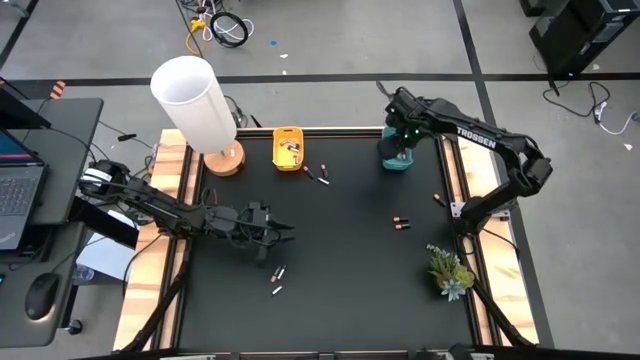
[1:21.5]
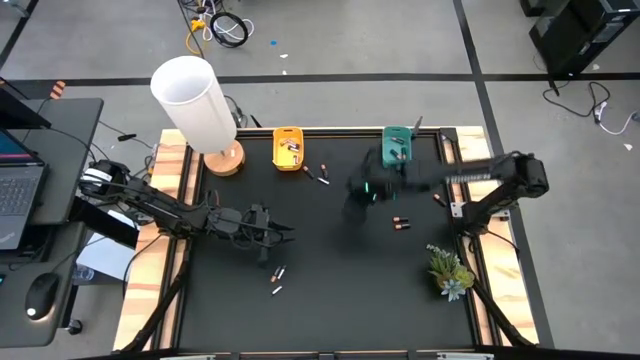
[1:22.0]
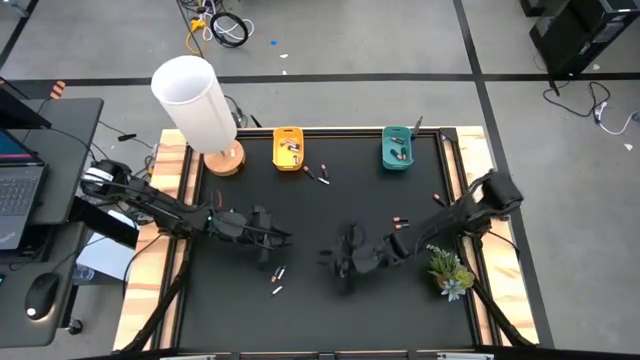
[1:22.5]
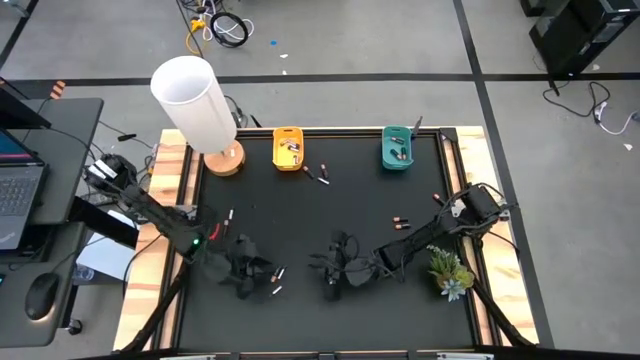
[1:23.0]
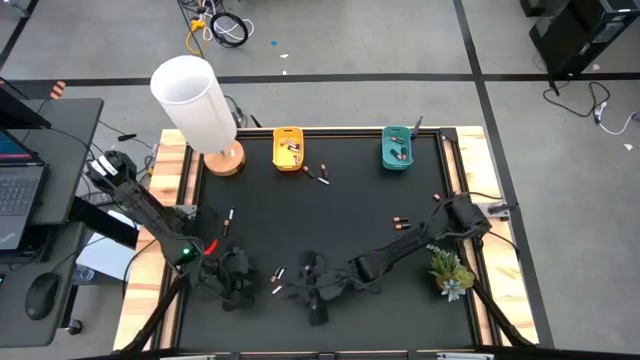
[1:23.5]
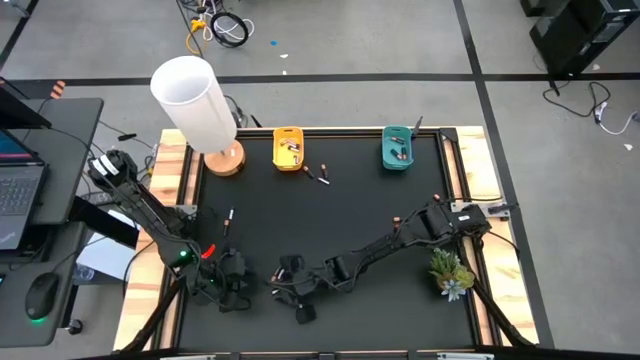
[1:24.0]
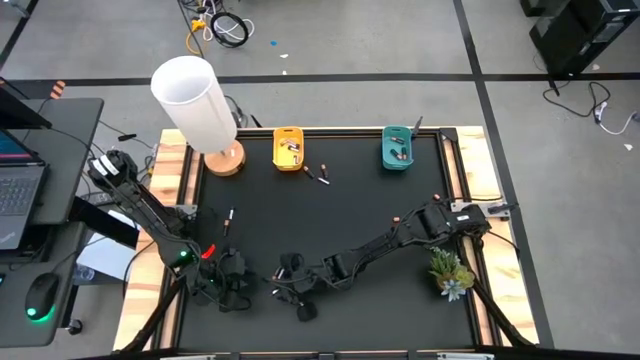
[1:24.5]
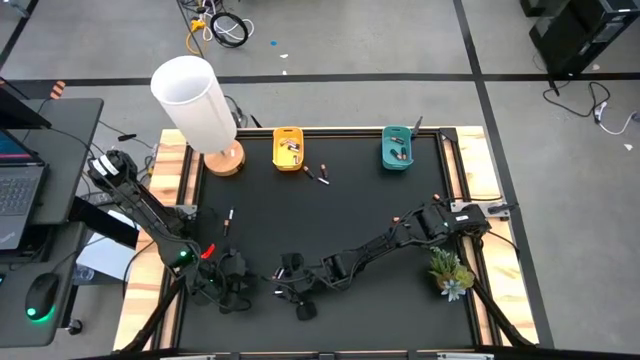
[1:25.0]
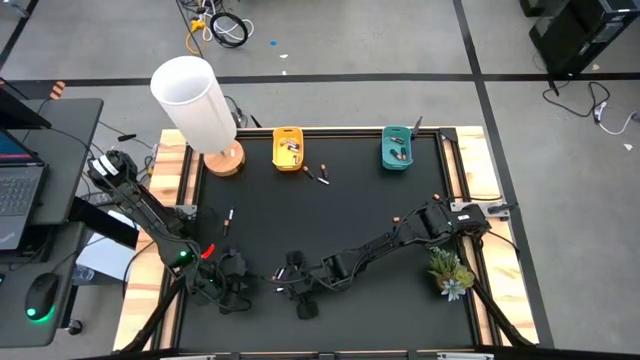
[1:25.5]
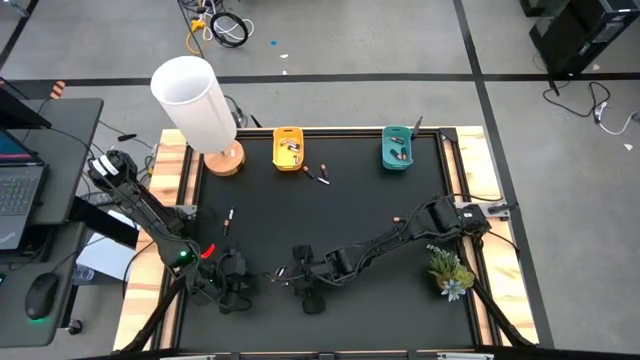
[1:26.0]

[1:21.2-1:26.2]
Task: Sort batteries
Put the silver battery into the yellow bin

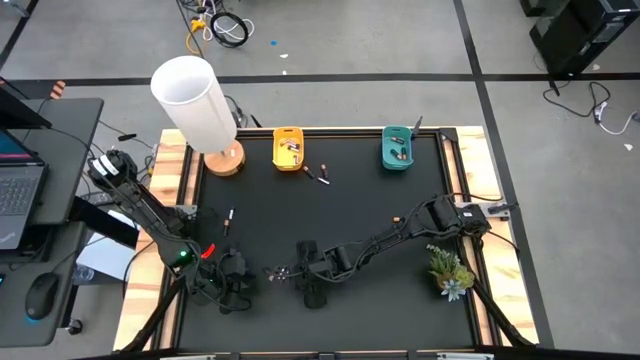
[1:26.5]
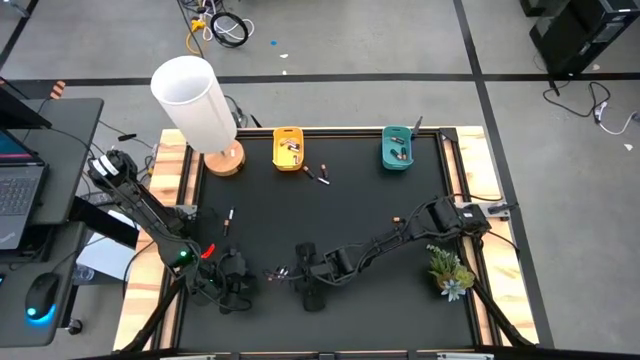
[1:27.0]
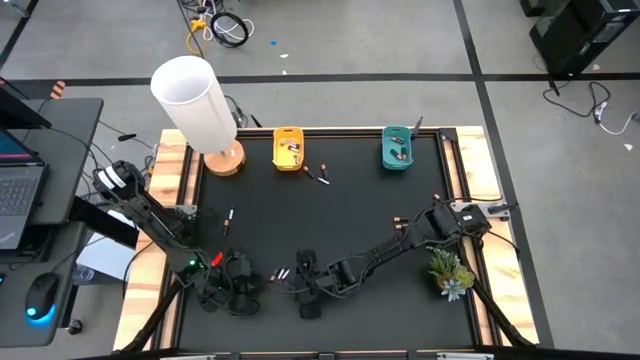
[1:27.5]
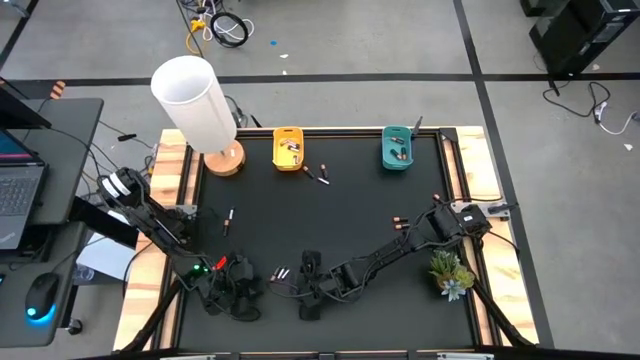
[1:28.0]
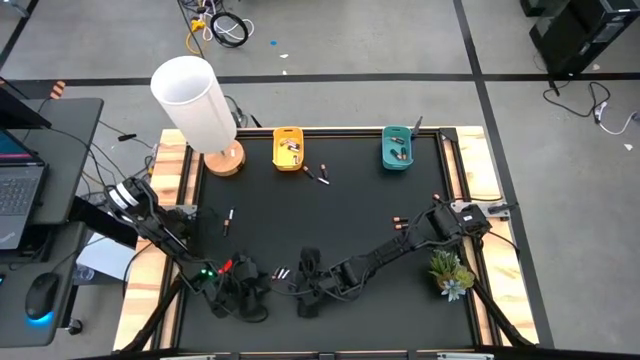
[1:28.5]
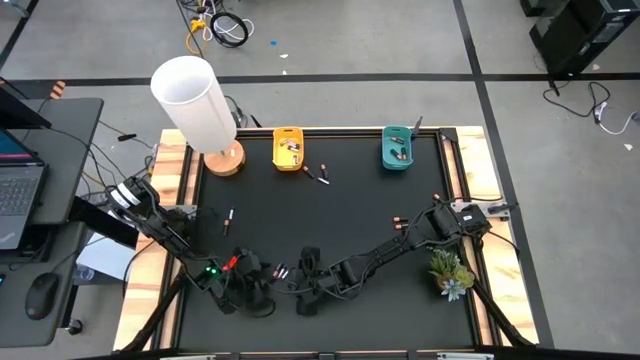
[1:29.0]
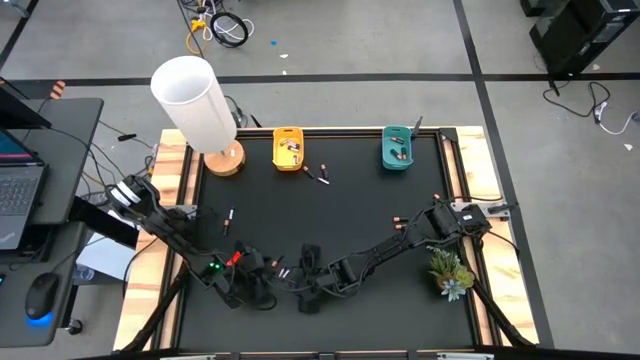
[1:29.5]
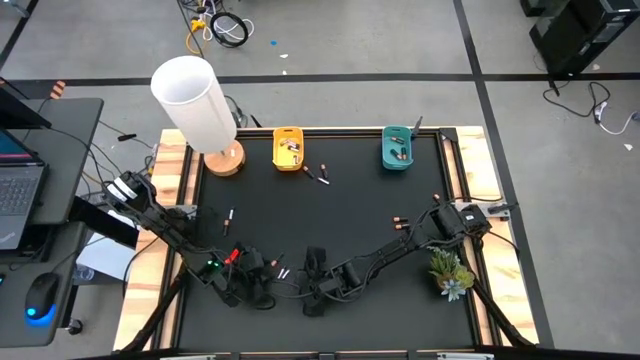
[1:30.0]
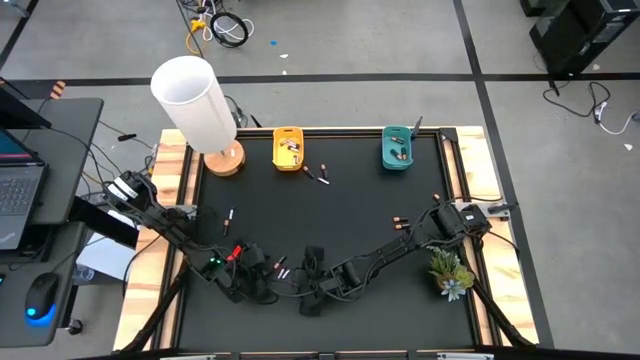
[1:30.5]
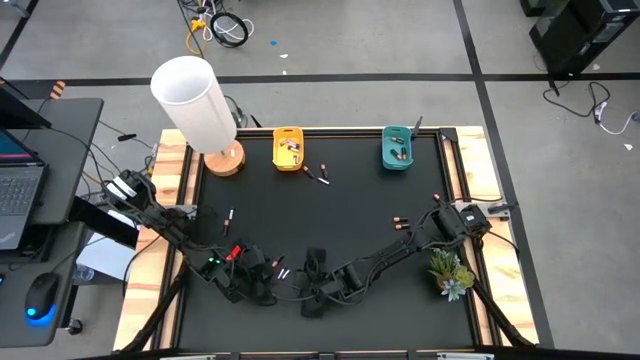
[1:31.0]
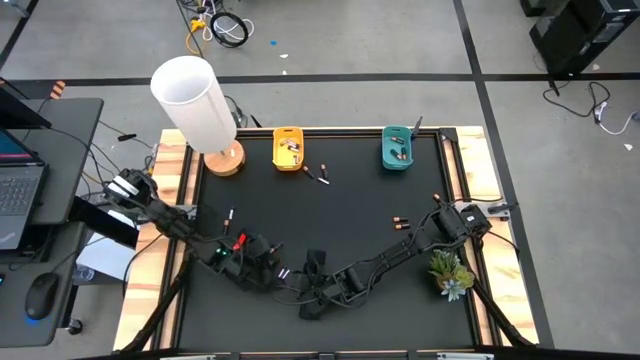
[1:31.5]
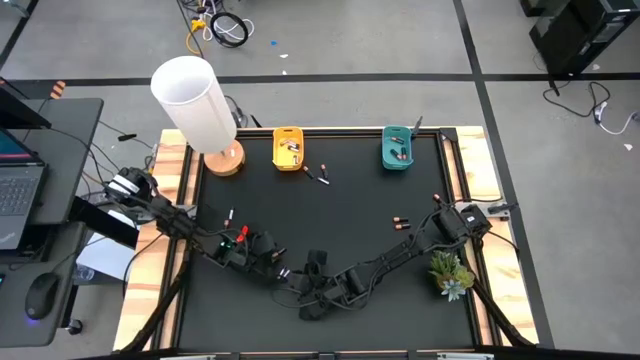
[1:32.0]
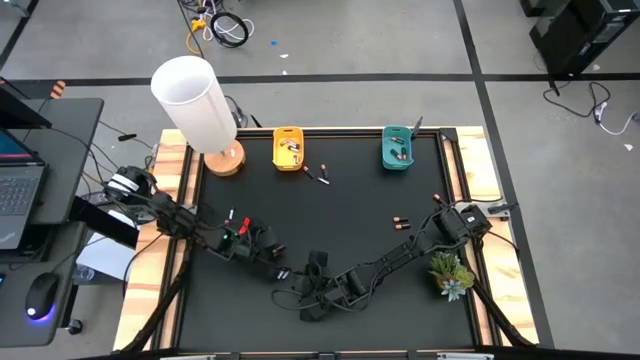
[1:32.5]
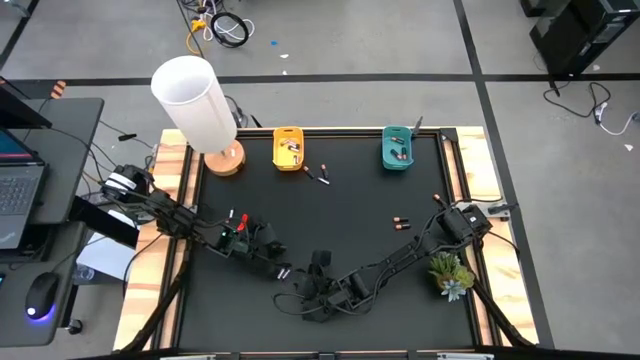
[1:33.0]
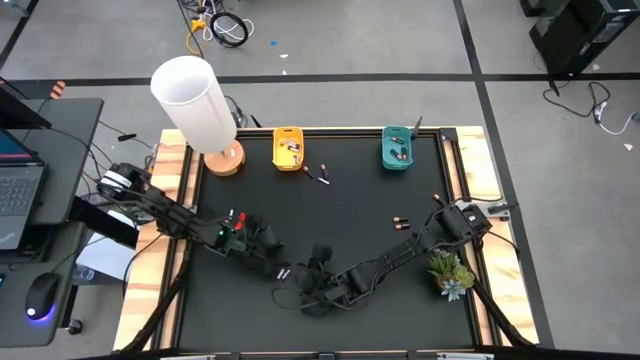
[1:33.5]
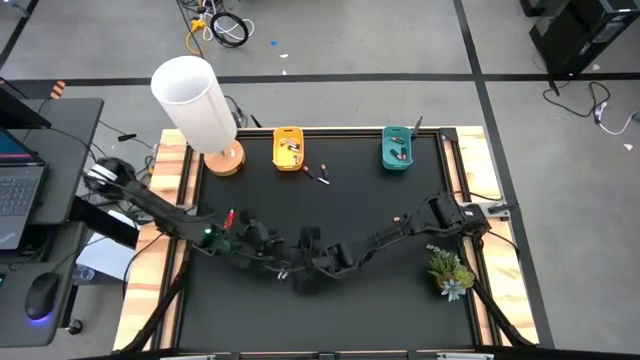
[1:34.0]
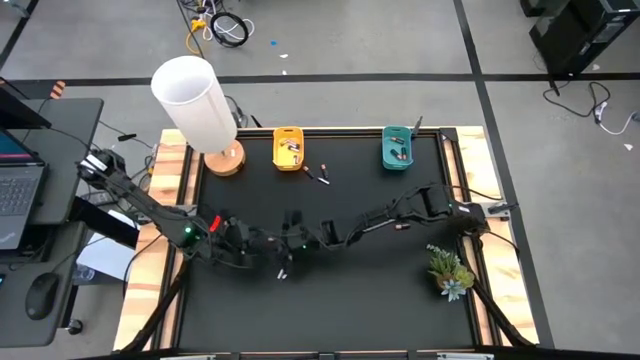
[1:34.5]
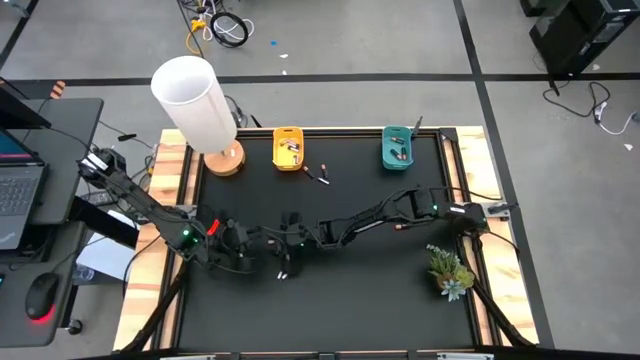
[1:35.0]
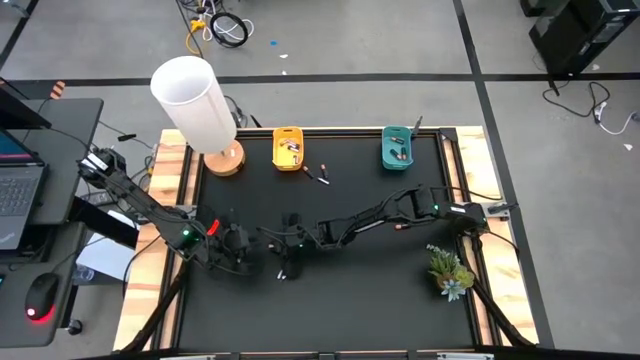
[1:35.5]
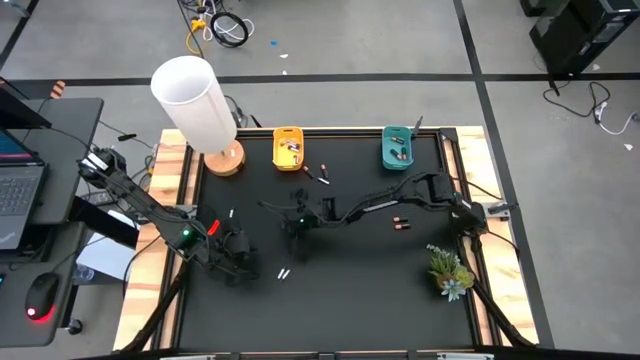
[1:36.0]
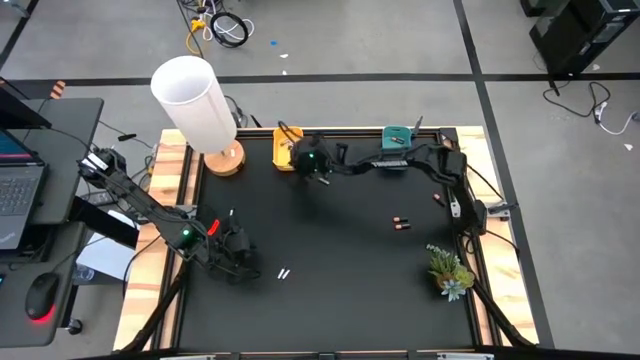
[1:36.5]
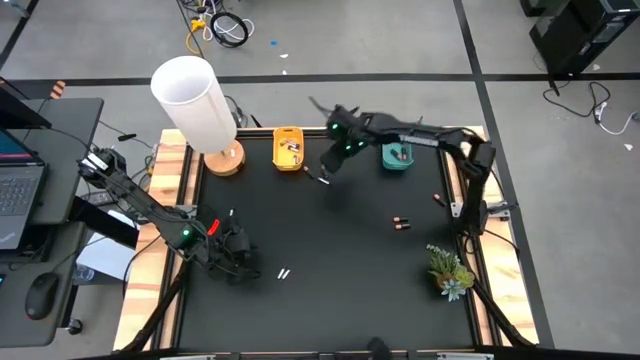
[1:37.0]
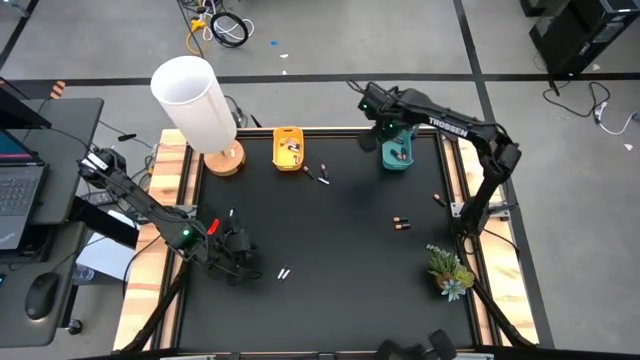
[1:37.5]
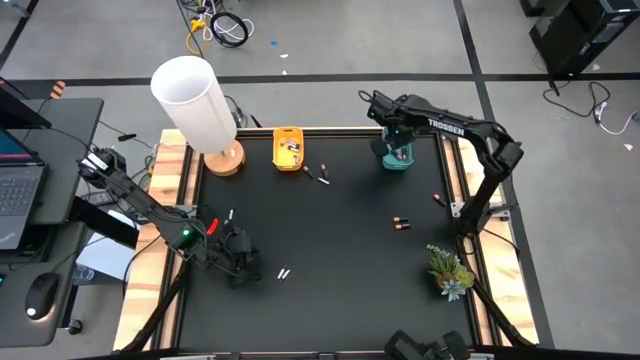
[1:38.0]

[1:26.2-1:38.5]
Put the black battery into the blue bin

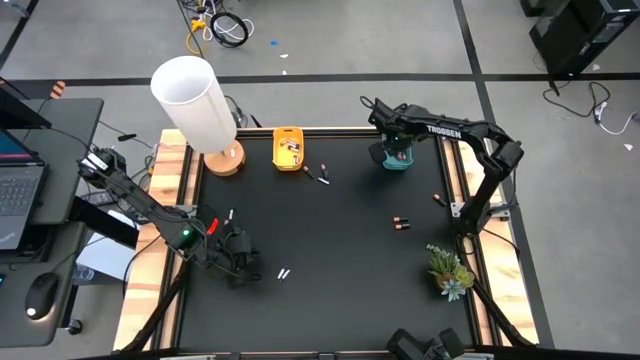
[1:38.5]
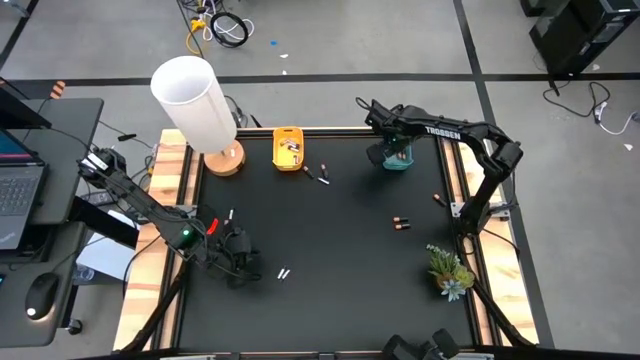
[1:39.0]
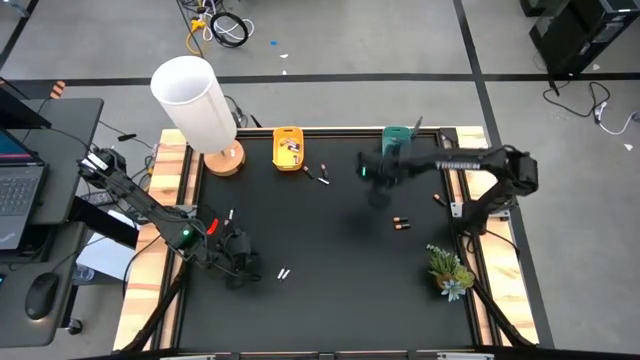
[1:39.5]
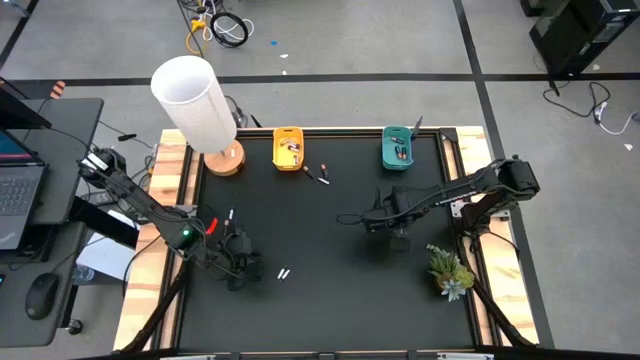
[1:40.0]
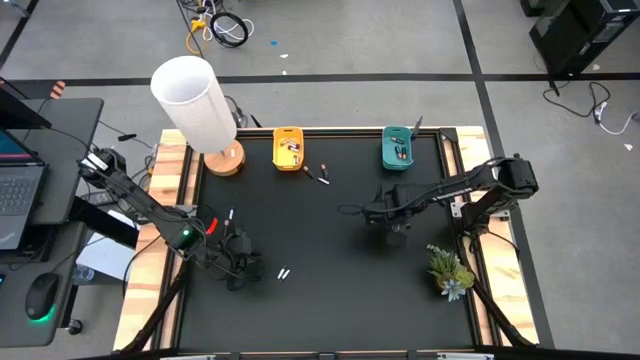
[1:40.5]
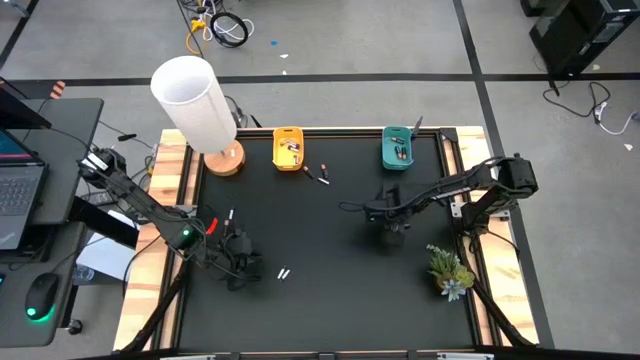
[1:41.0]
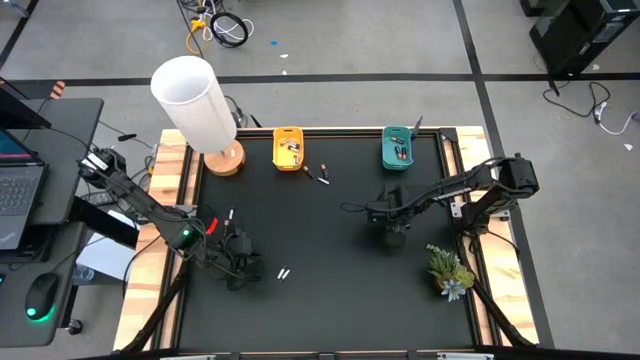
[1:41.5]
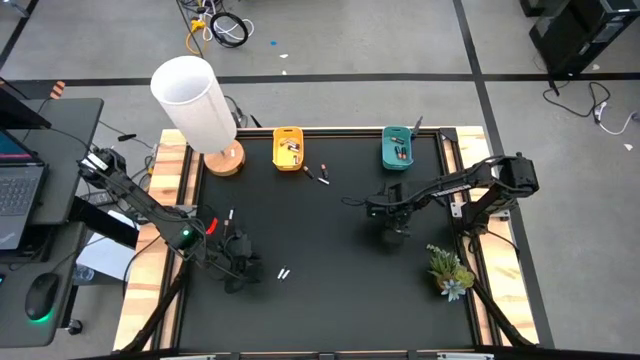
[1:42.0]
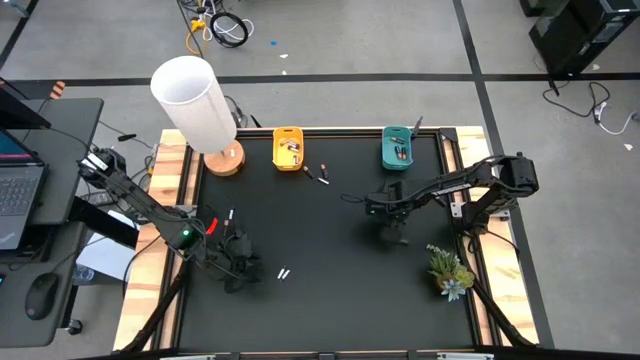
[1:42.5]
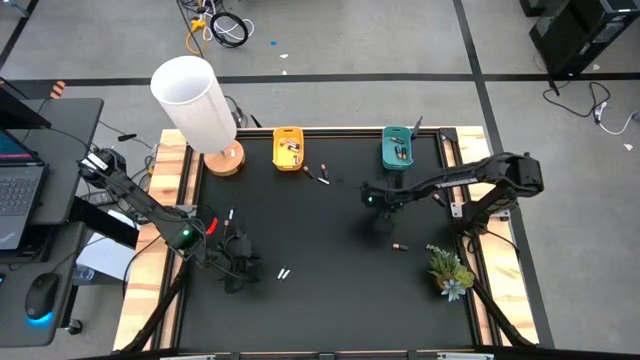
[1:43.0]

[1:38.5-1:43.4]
Put the black battery into the blue bin
